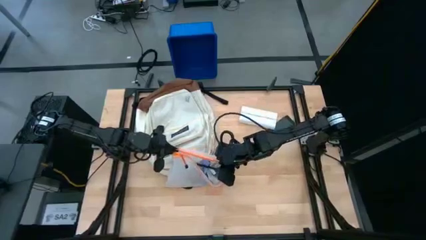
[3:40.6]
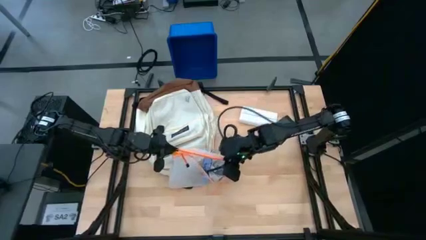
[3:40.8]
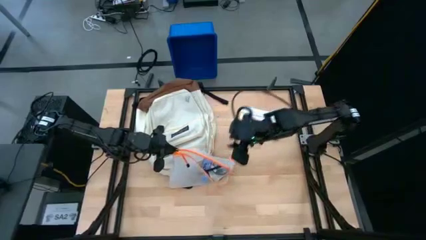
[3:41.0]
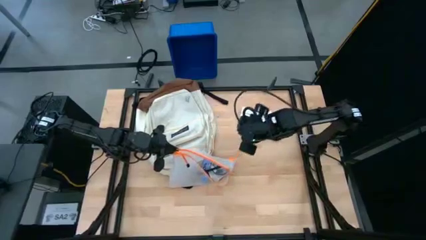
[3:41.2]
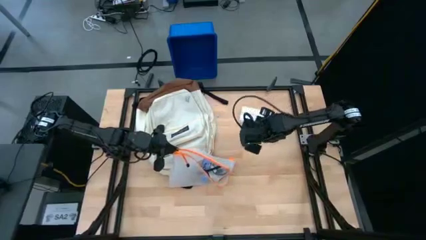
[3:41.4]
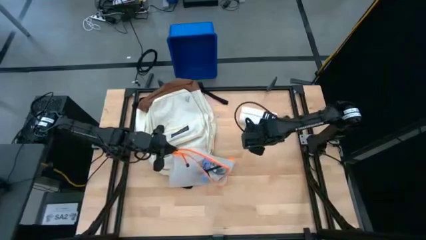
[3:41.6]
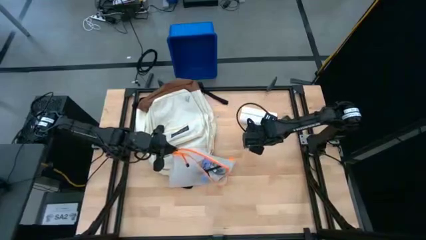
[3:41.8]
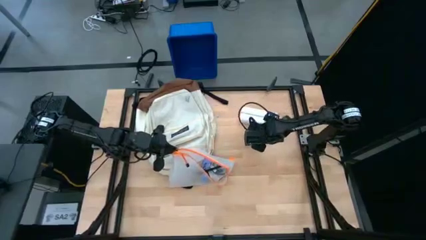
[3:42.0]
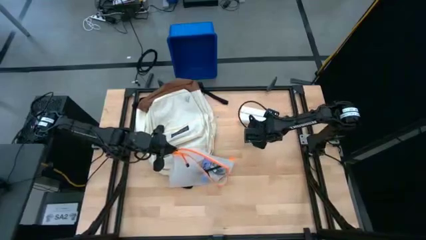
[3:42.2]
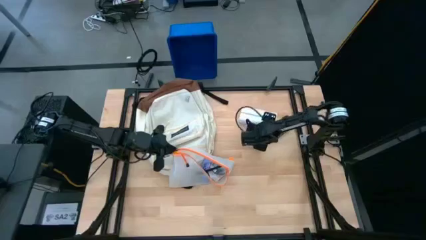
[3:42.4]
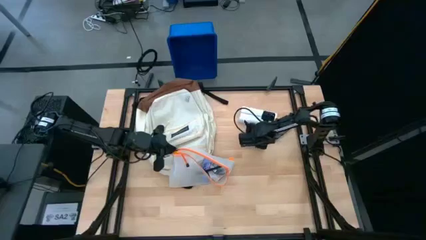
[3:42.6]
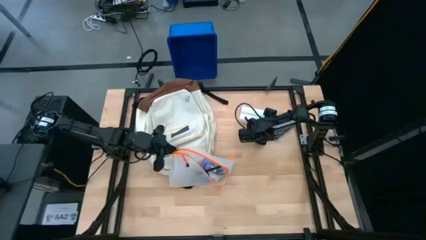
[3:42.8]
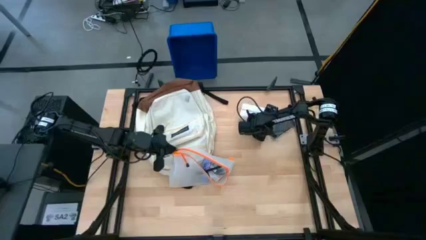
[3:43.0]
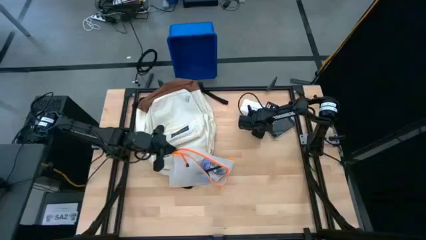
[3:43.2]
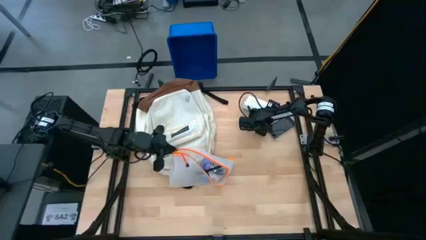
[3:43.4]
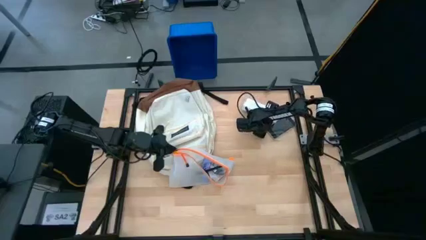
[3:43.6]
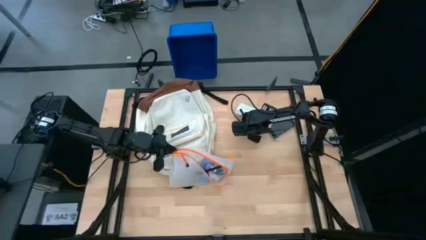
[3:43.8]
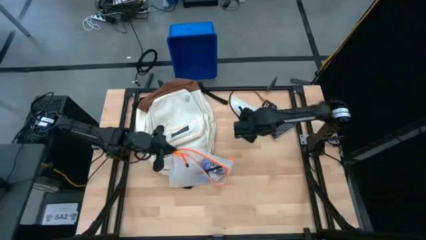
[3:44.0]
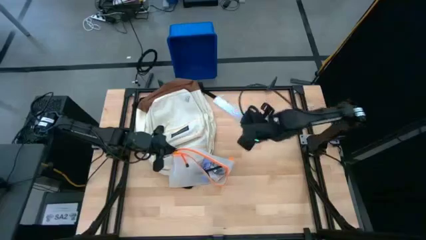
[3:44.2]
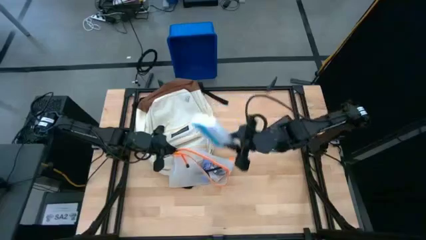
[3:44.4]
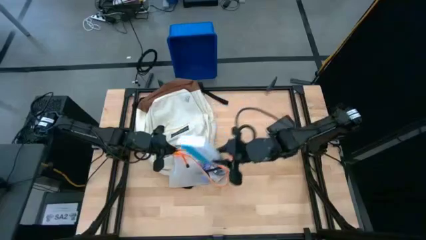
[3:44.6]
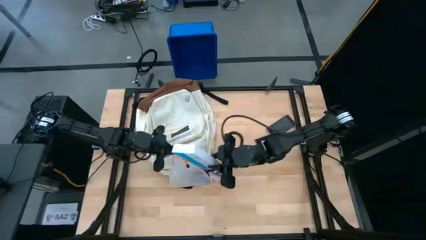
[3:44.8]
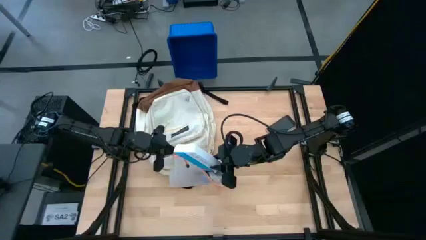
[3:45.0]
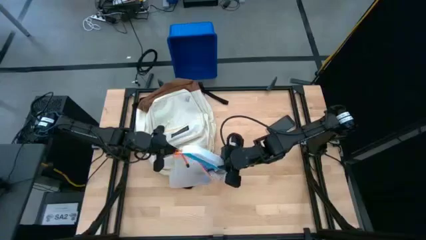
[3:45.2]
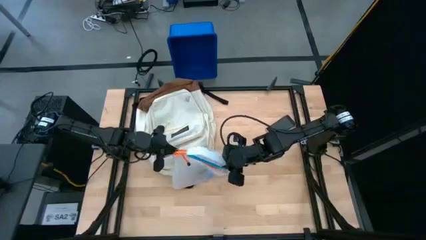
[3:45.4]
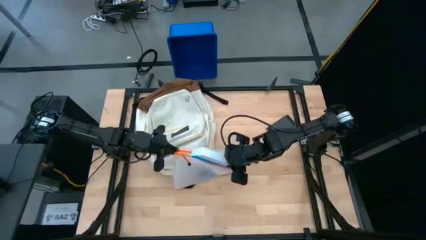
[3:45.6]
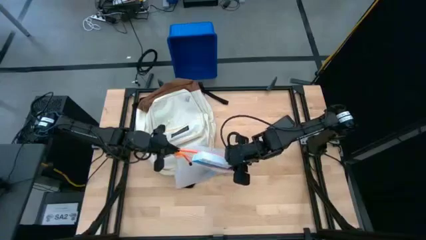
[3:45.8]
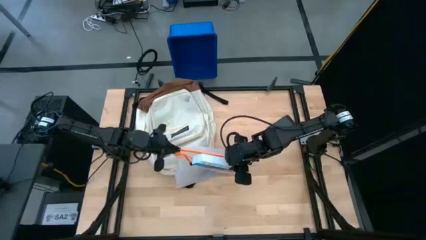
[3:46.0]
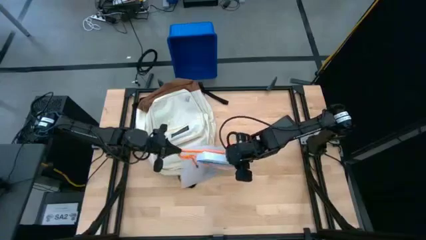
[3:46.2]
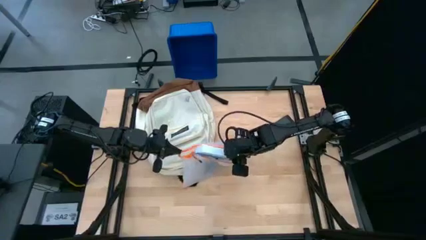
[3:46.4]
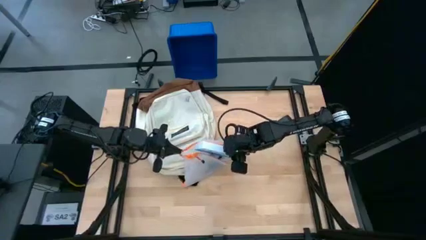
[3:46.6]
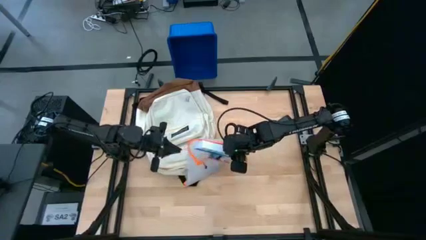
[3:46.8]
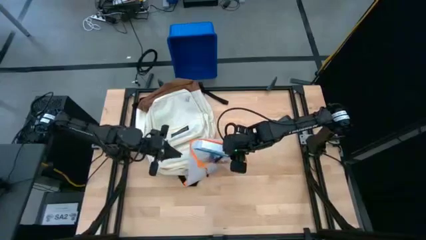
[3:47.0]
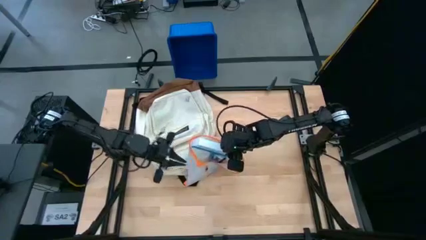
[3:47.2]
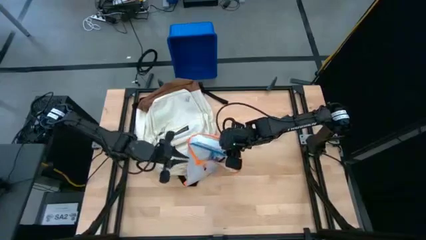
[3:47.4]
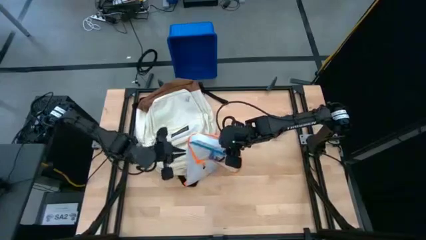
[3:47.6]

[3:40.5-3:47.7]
Task: Unpack backpack
Put the white medicine organizer into the zip bag

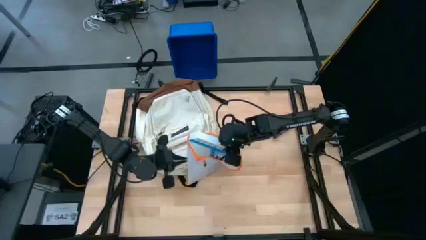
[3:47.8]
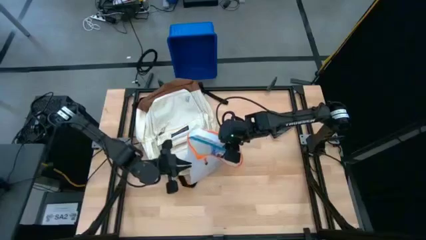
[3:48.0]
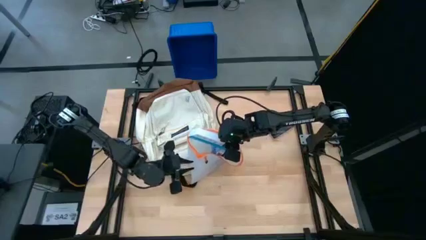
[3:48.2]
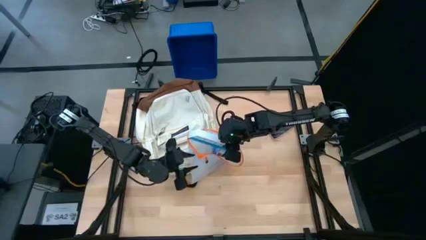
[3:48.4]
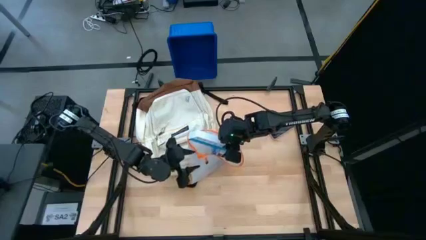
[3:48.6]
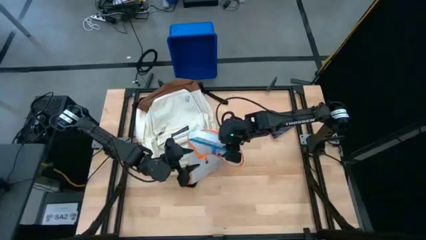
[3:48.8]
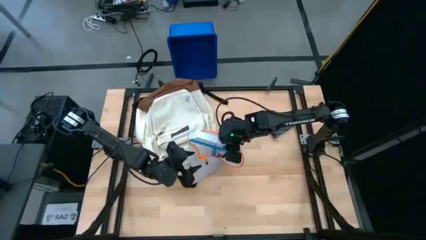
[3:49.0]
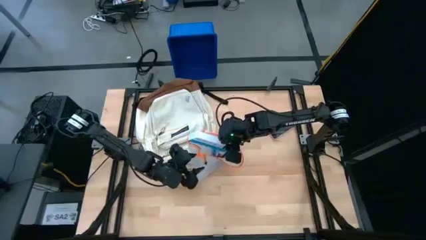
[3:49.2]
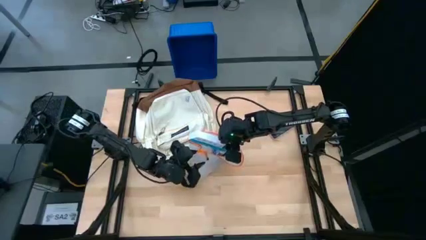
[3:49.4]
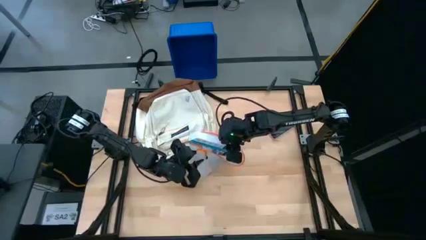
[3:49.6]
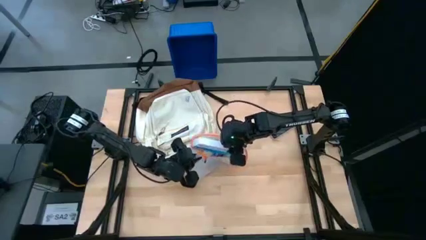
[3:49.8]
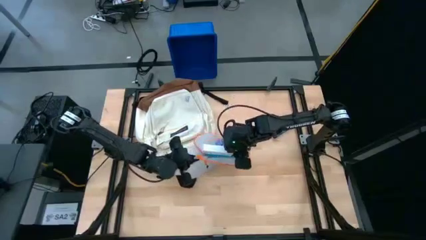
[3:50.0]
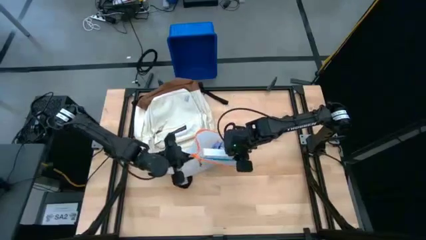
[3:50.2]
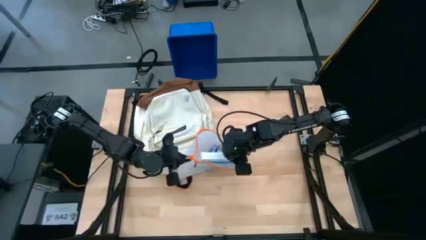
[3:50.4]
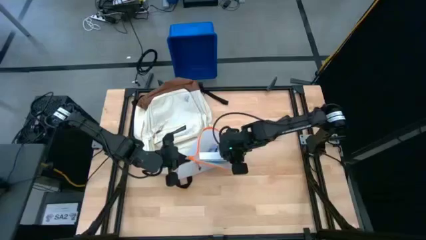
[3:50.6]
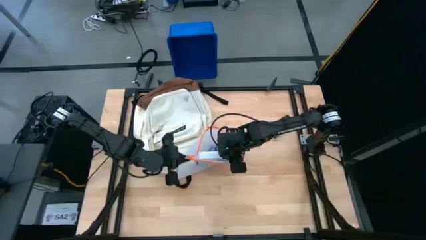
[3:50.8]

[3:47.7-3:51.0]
Put the white medicine organizer into the zip bag

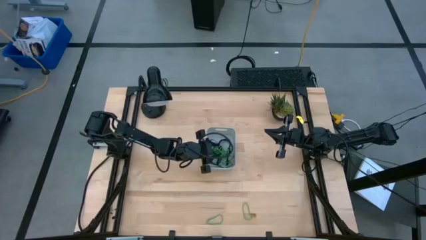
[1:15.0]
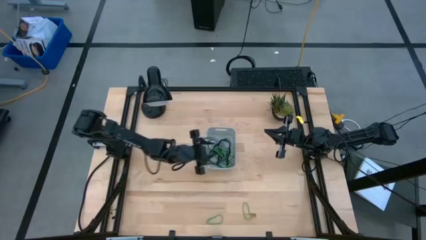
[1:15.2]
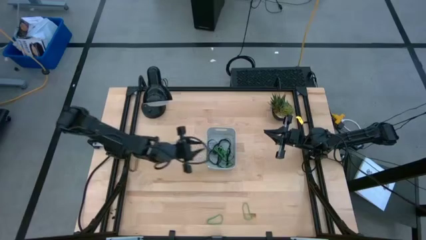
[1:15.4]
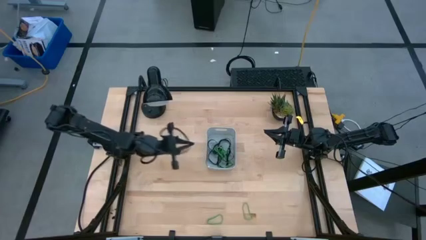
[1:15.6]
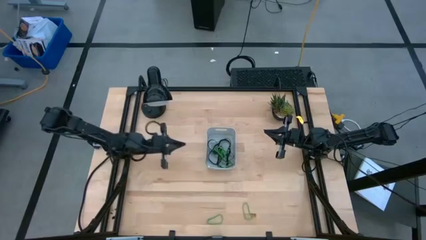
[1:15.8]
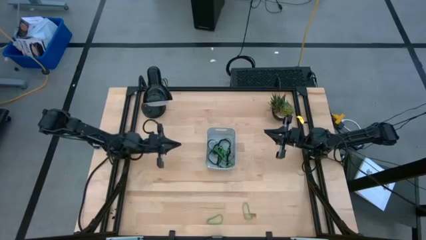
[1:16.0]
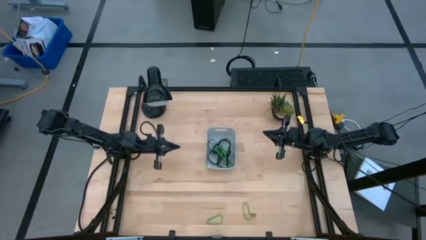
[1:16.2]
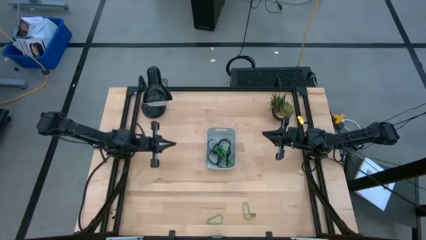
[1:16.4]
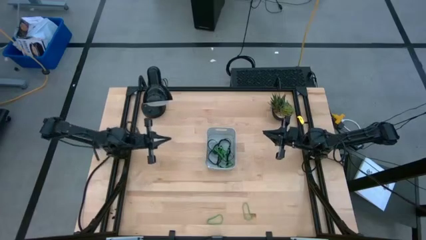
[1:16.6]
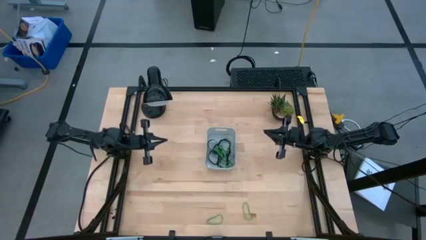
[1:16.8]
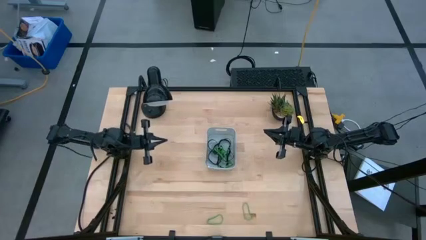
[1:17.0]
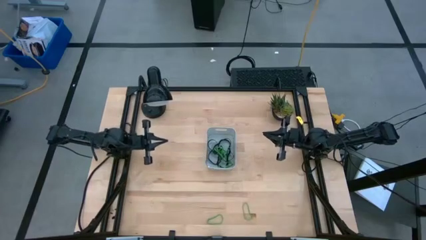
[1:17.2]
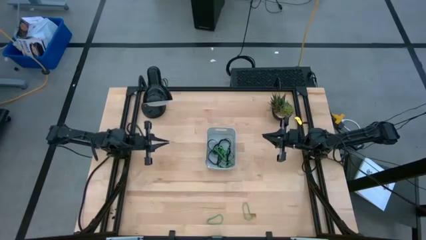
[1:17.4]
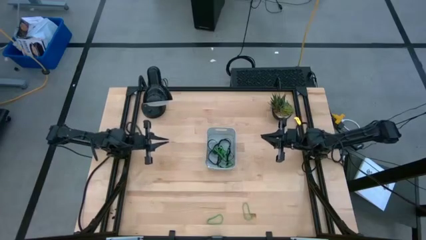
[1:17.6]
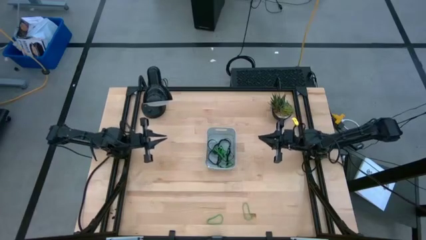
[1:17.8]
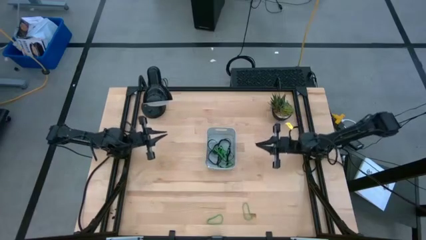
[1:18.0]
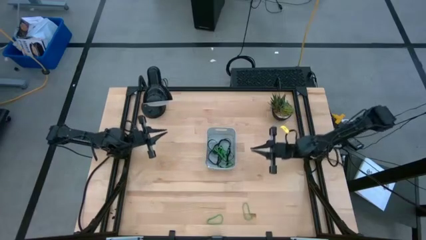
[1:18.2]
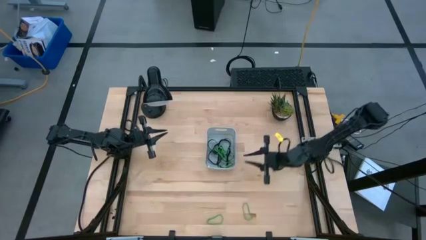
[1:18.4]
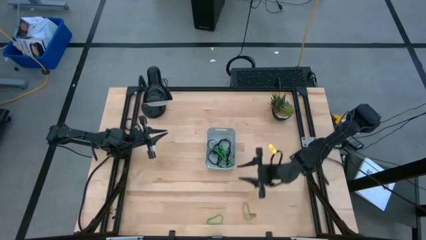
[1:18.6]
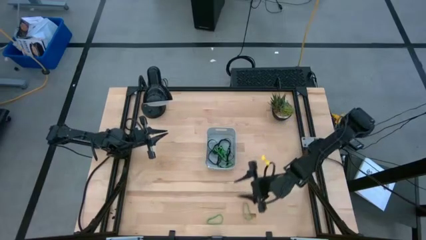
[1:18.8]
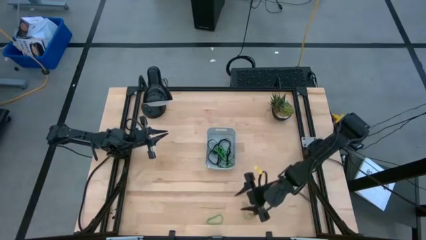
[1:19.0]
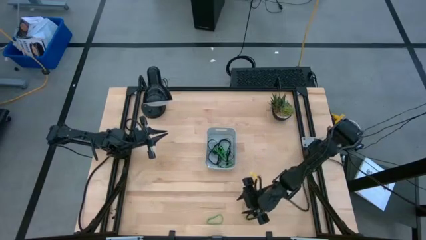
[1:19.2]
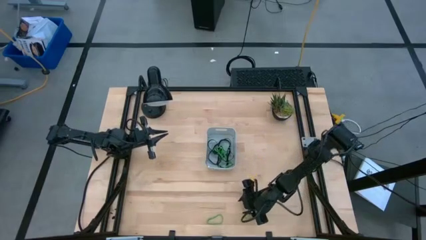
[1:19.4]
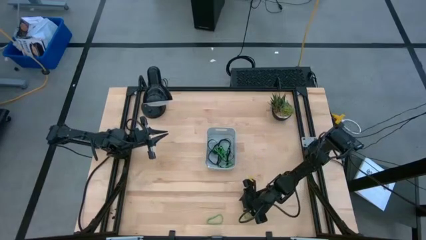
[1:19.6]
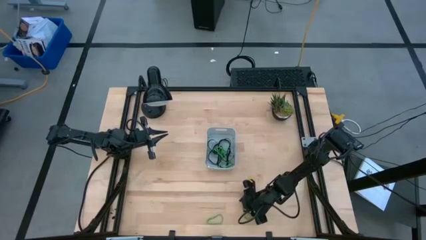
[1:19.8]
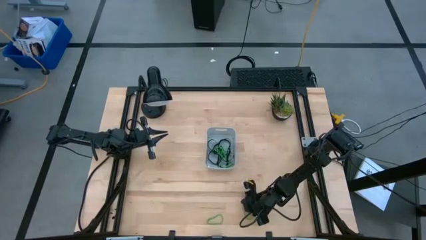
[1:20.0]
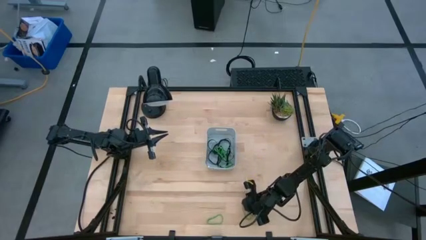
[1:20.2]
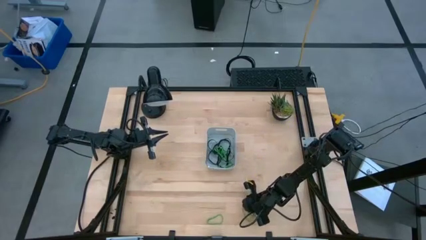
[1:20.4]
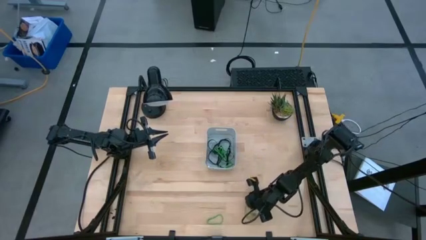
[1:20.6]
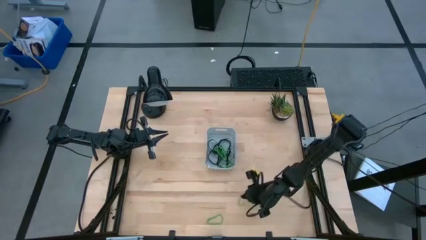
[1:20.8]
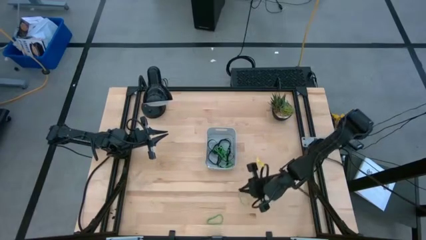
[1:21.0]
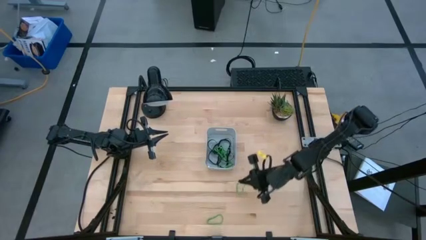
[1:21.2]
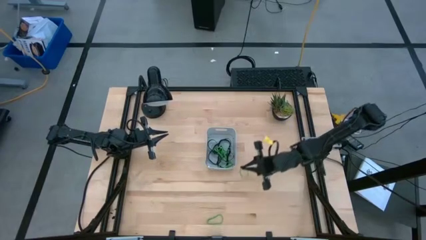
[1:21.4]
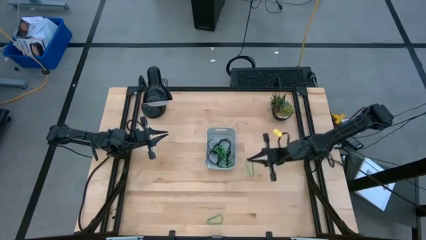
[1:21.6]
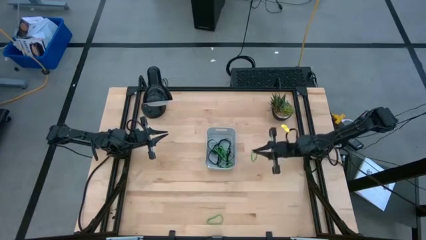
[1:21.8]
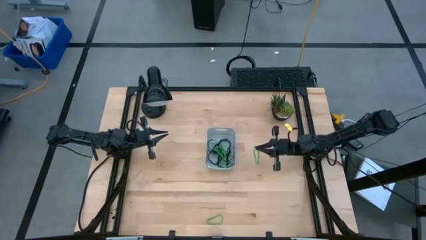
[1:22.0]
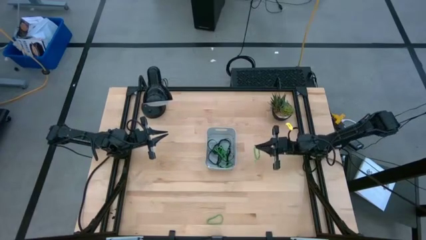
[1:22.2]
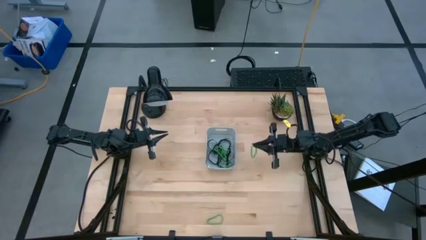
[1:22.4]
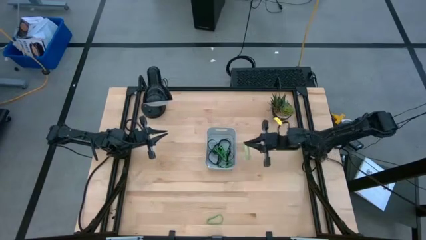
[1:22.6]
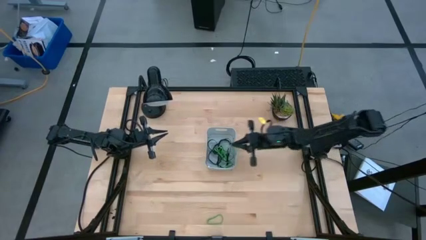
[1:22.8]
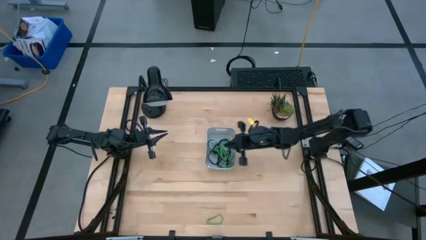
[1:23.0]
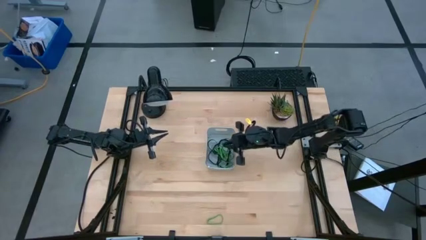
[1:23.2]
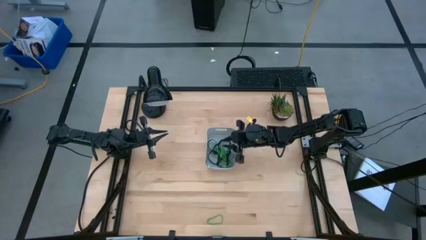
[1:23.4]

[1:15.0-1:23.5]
Task: Pick and place rubber bands into bin
Put the green rubber band into the gray bin
